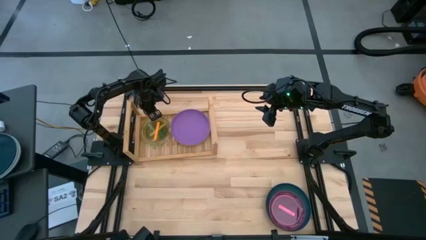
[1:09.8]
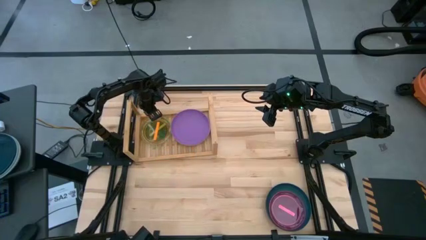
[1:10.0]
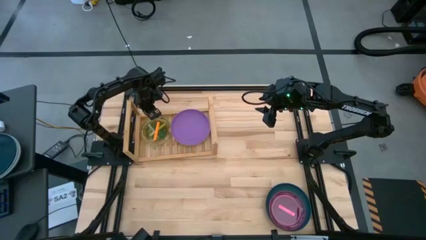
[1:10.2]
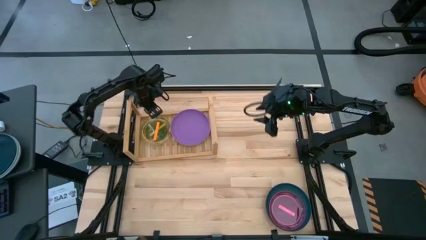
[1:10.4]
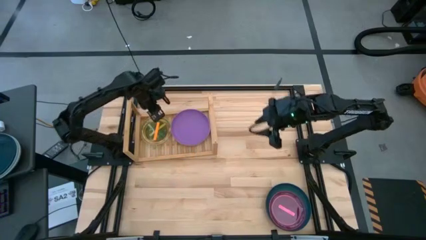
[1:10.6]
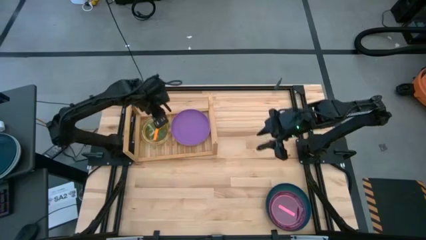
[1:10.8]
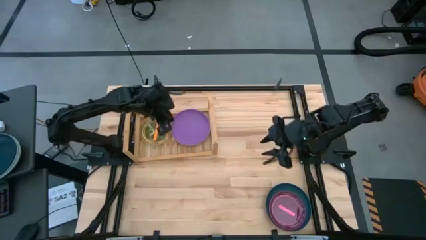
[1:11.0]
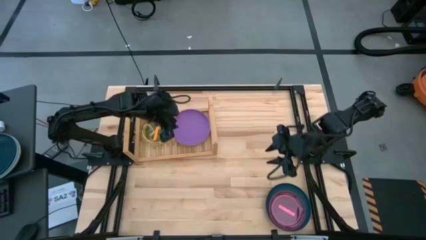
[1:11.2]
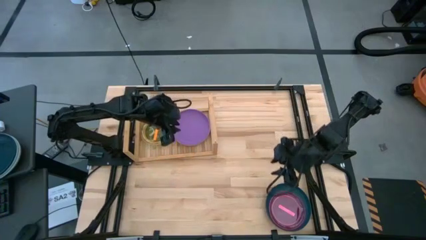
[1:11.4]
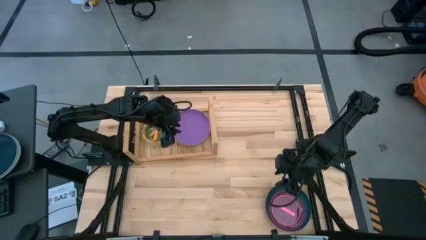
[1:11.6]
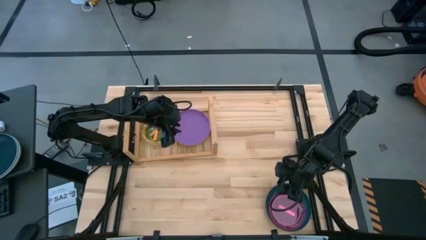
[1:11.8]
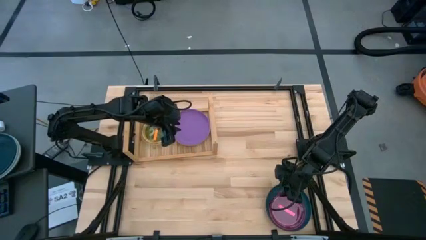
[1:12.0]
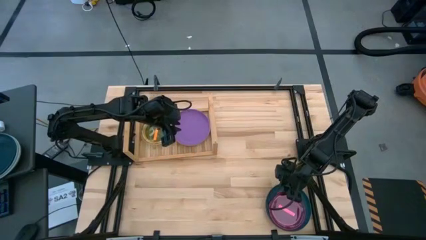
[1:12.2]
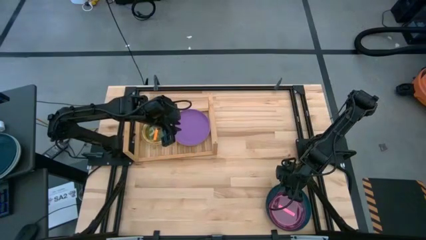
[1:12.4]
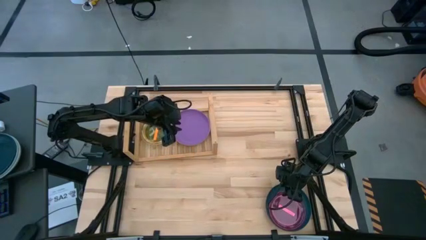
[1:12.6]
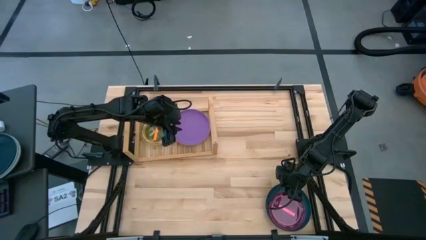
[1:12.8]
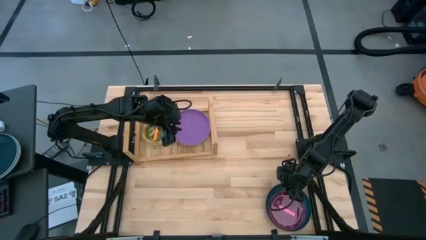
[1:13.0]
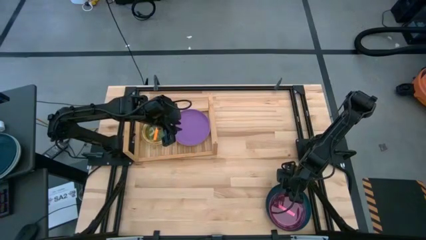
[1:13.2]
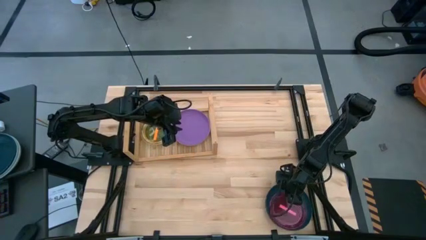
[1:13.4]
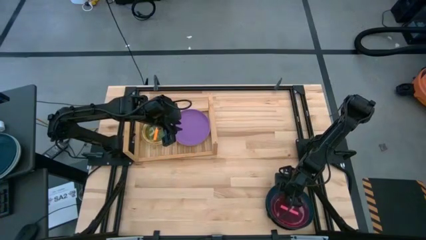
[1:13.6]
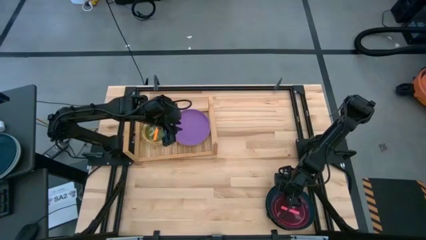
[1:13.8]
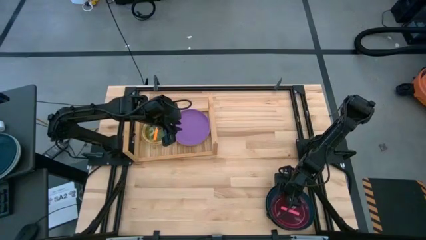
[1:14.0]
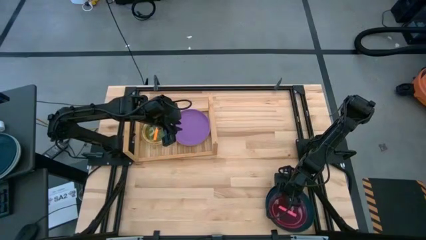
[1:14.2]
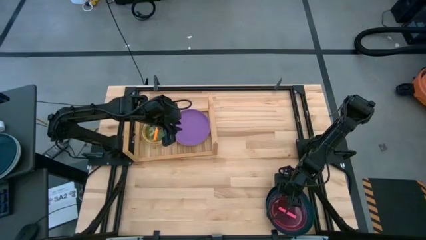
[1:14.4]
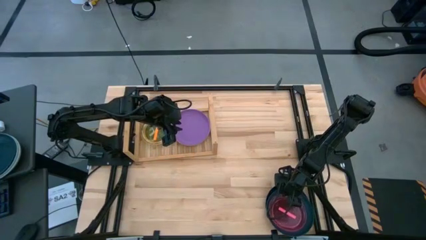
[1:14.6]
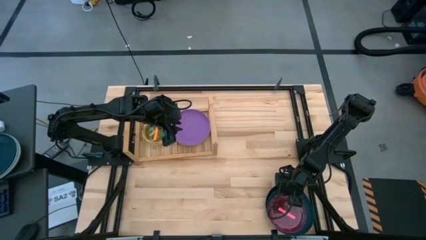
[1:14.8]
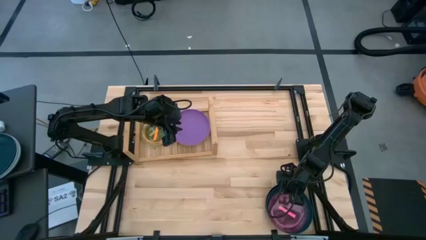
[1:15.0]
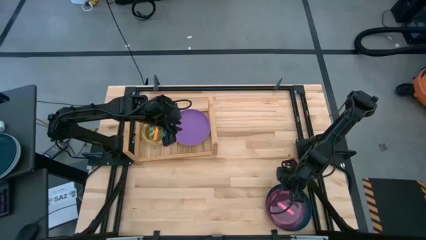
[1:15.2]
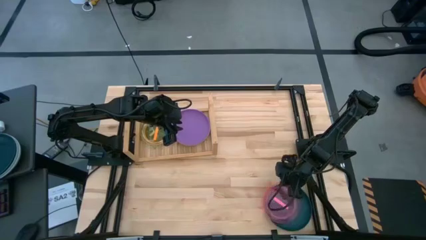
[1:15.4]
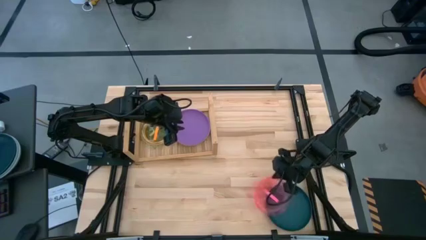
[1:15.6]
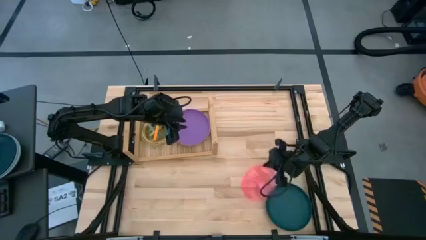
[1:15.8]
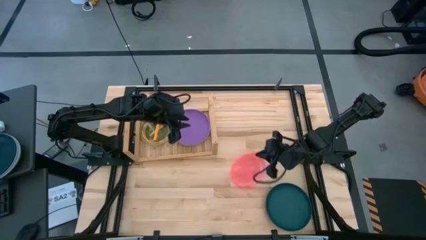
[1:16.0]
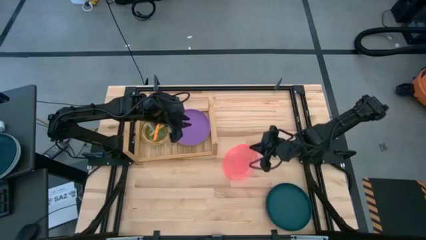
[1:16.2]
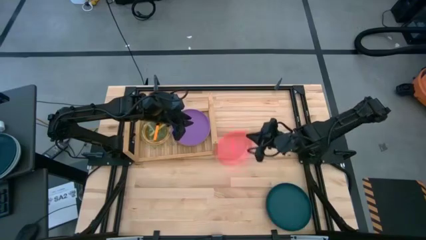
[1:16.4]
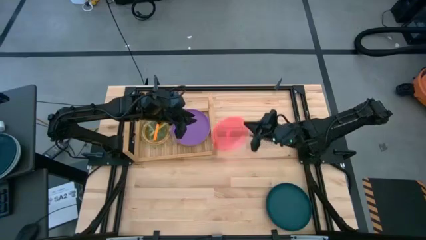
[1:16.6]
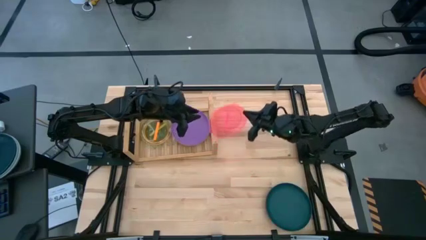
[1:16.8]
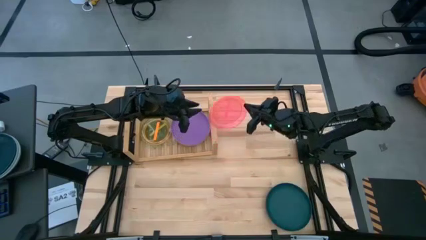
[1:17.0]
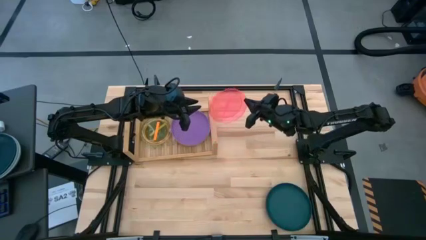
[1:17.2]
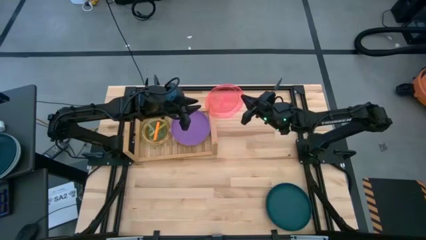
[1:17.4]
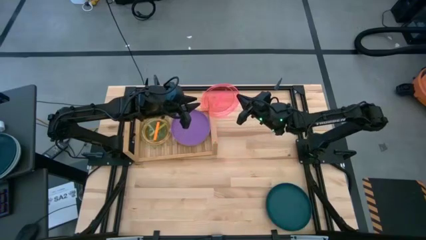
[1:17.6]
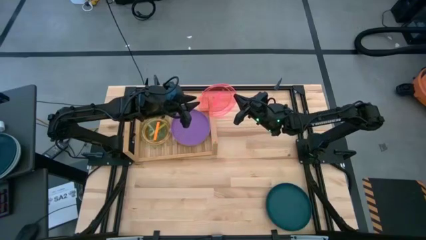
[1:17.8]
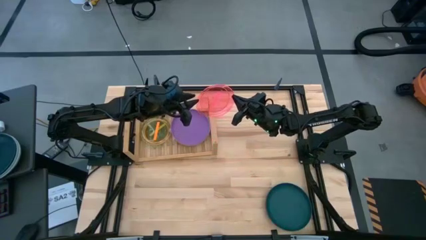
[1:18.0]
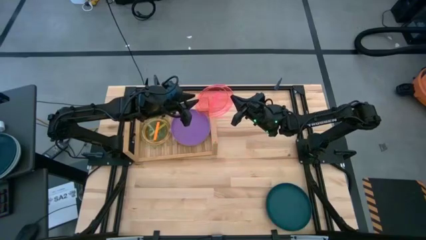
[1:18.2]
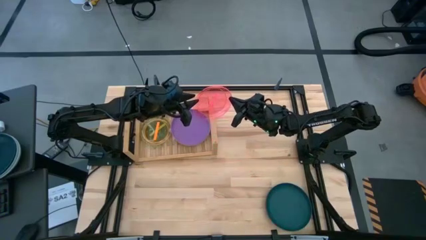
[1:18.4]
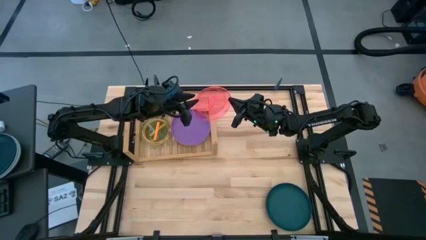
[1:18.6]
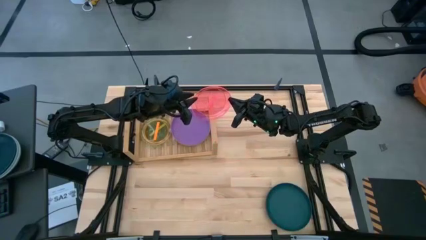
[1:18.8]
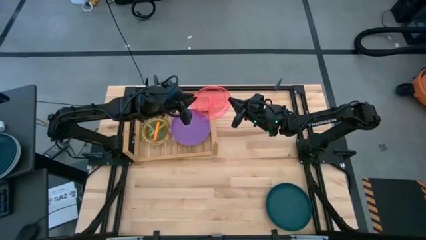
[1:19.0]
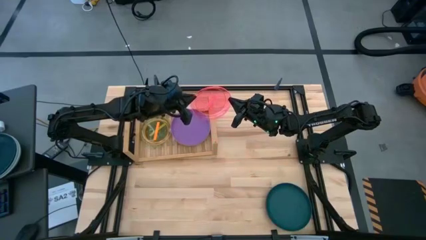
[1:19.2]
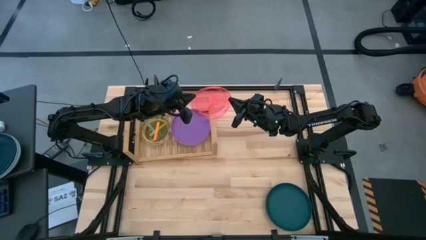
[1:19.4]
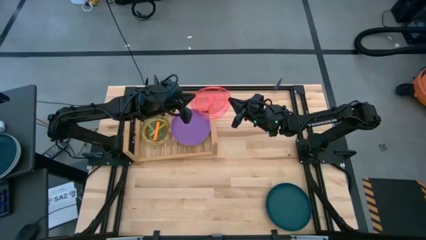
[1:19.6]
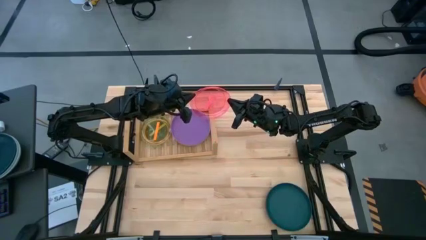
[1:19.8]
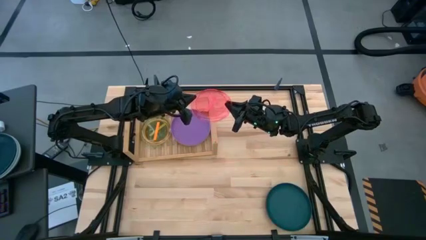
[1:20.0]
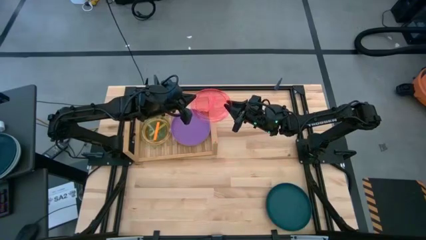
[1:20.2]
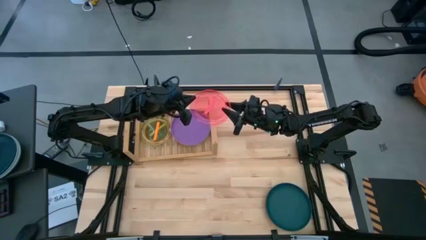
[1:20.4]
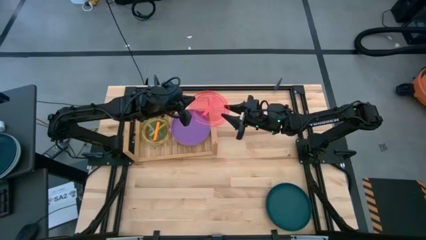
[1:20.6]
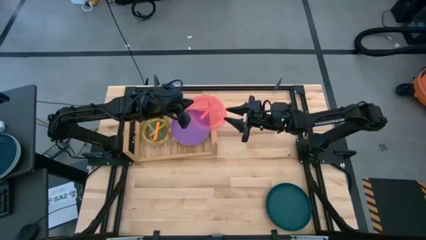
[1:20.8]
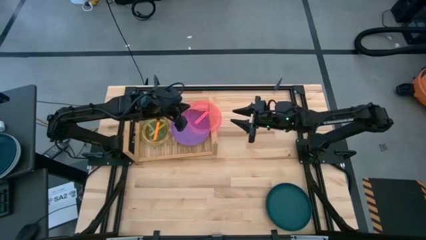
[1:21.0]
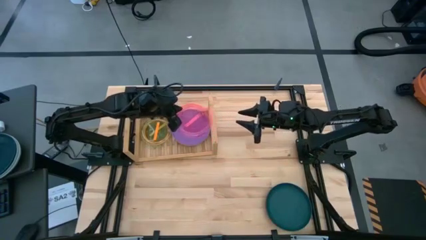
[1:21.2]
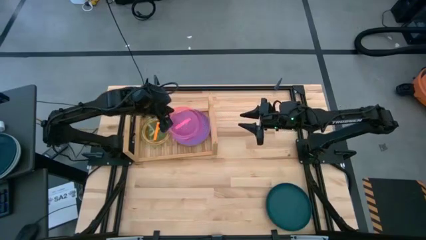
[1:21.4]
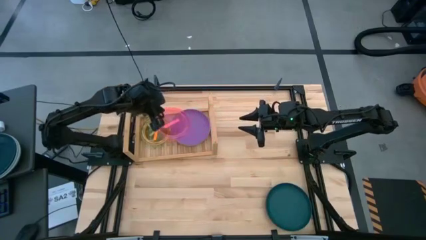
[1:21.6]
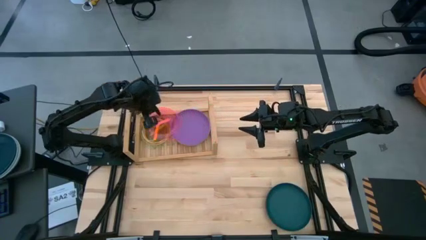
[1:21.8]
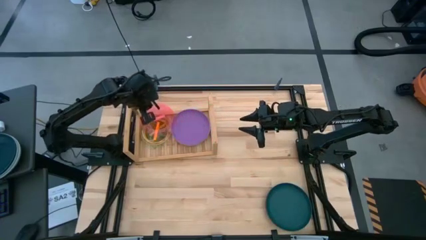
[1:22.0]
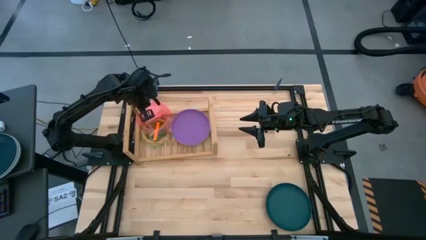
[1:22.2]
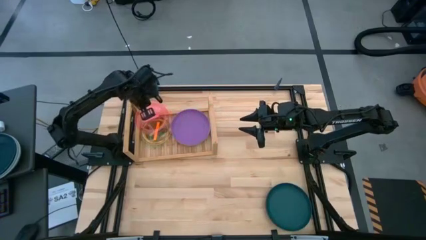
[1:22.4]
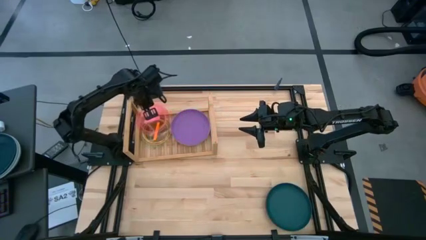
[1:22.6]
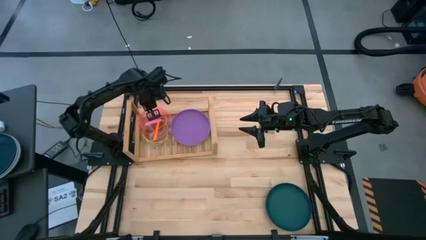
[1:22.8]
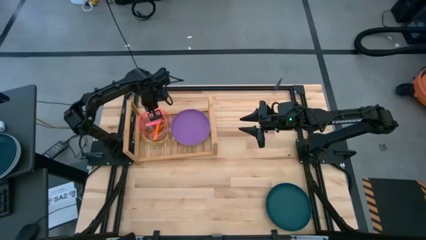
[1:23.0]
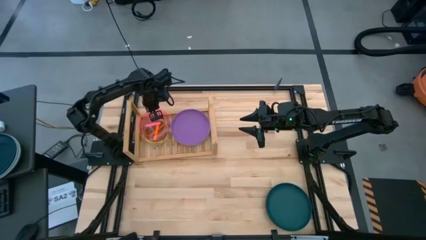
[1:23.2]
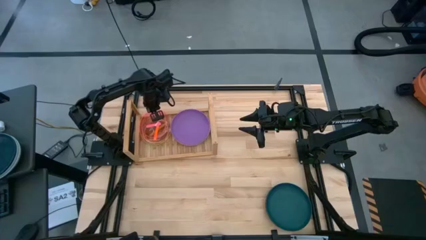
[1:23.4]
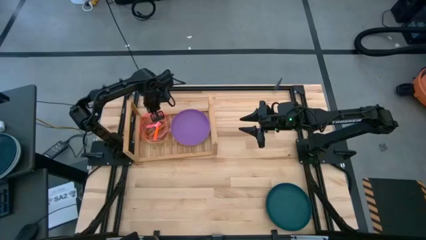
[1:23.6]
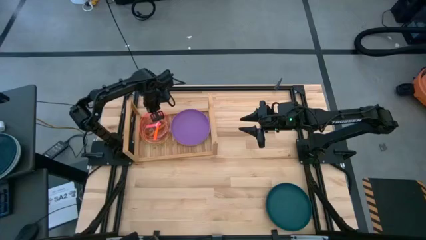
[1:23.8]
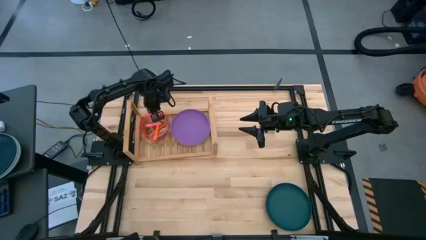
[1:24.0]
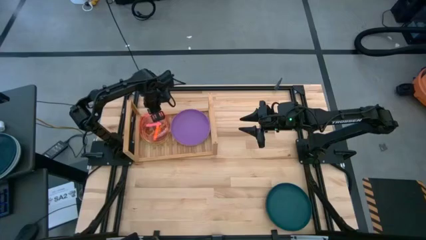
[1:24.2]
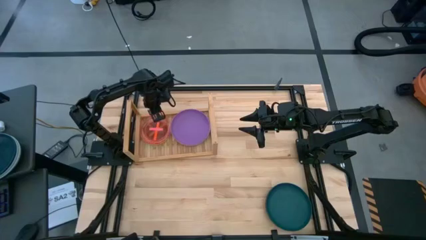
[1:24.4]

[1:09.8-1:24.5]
Task: Place and stack plates onto a shelf
Stack the red plate on top of the orange plate on the shelf
